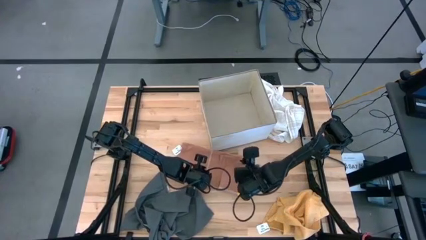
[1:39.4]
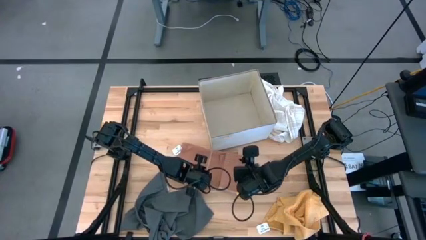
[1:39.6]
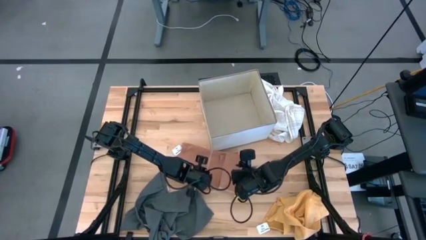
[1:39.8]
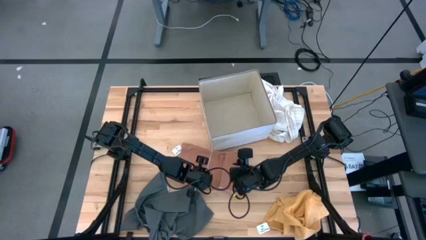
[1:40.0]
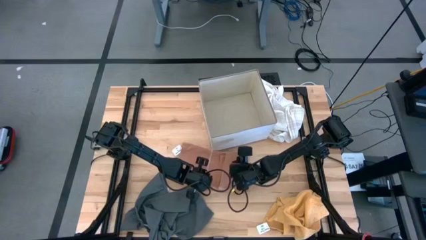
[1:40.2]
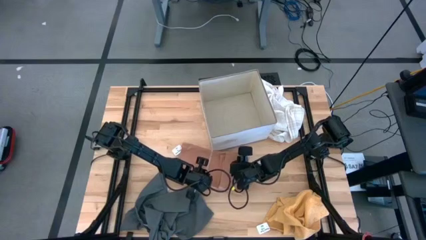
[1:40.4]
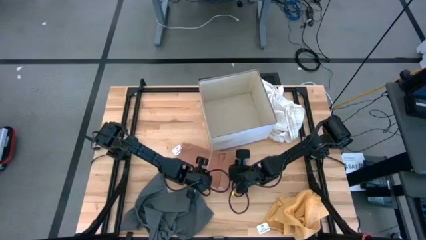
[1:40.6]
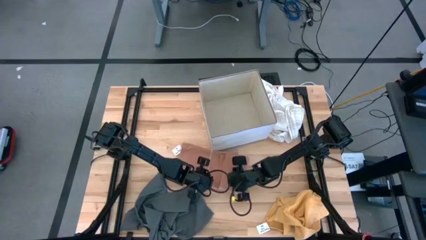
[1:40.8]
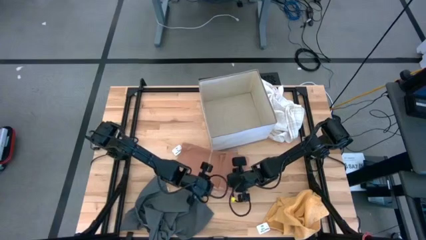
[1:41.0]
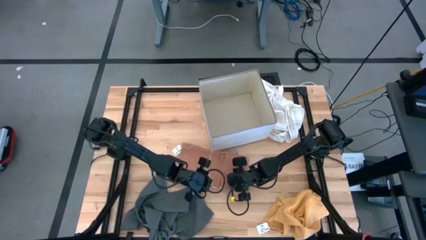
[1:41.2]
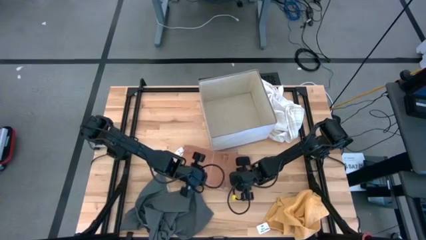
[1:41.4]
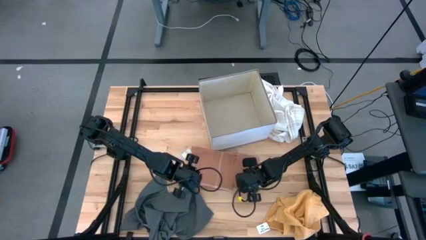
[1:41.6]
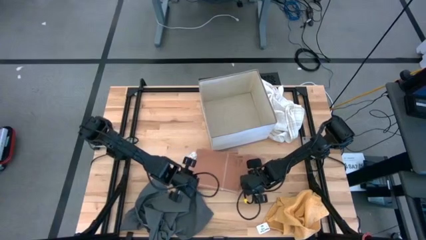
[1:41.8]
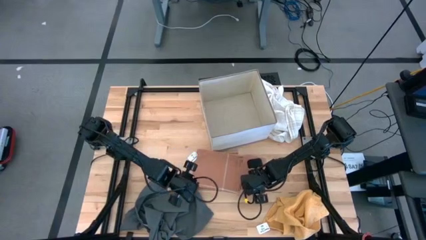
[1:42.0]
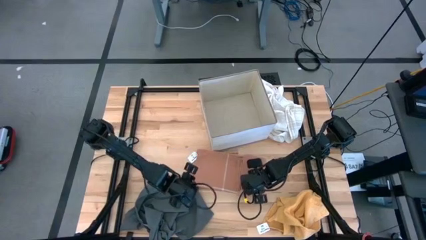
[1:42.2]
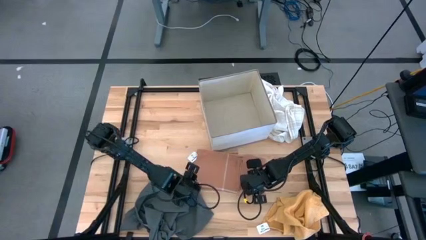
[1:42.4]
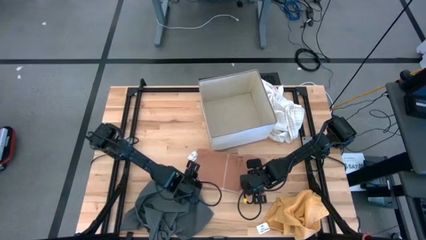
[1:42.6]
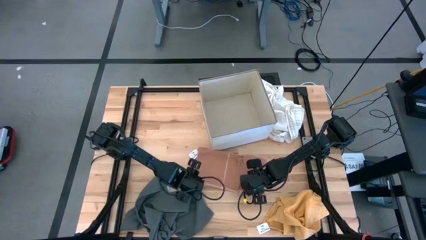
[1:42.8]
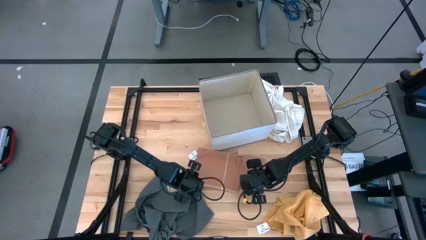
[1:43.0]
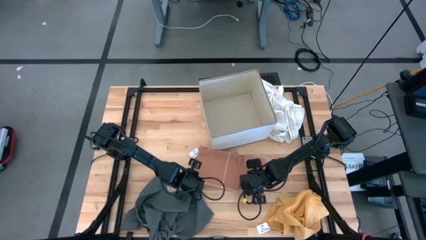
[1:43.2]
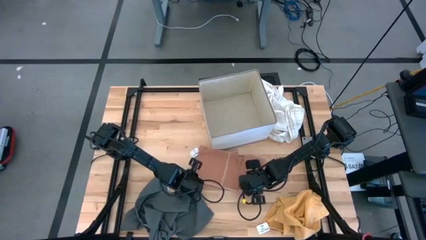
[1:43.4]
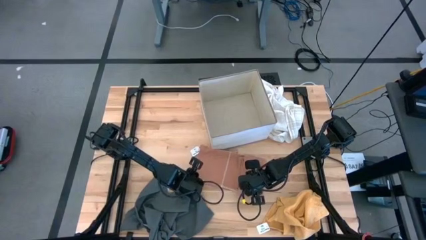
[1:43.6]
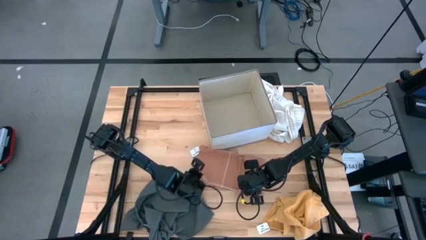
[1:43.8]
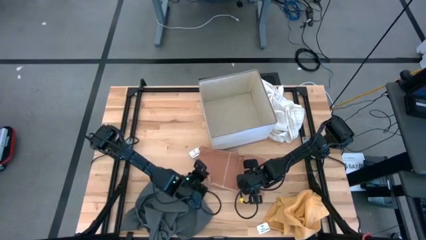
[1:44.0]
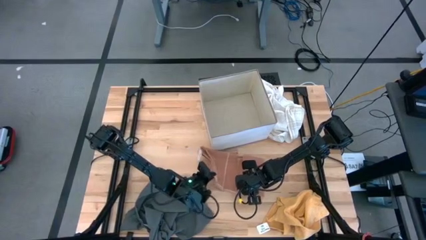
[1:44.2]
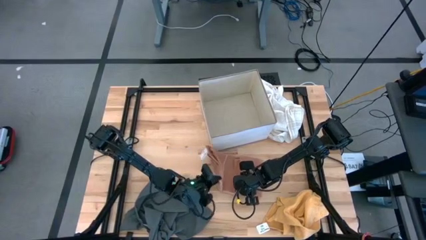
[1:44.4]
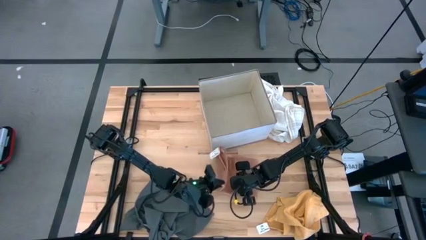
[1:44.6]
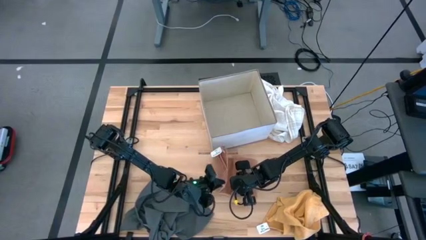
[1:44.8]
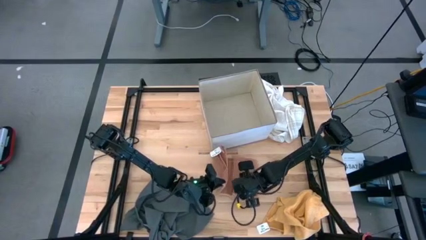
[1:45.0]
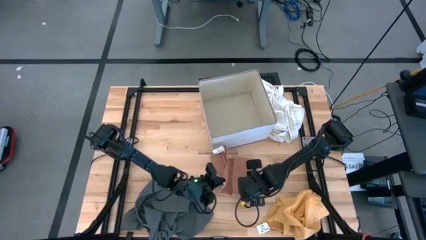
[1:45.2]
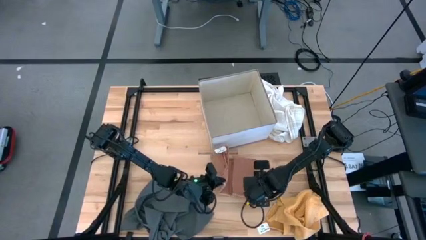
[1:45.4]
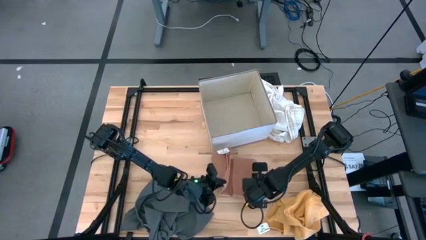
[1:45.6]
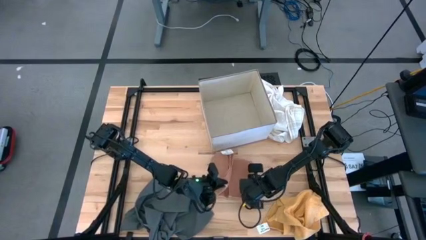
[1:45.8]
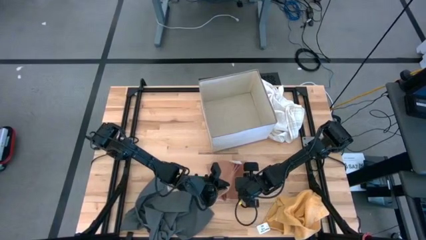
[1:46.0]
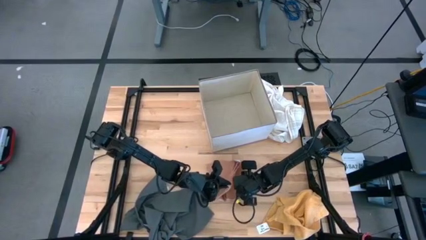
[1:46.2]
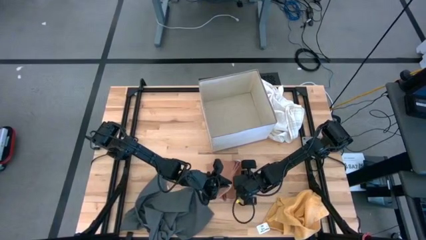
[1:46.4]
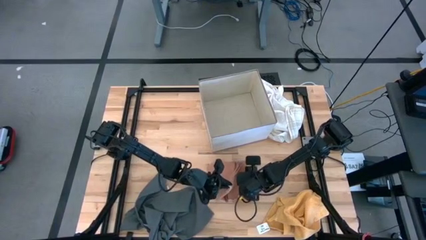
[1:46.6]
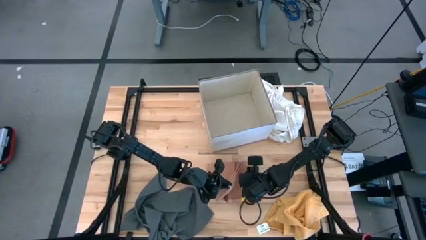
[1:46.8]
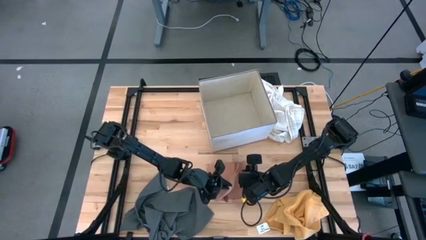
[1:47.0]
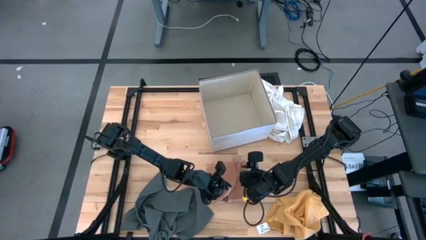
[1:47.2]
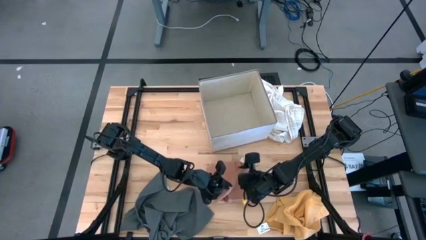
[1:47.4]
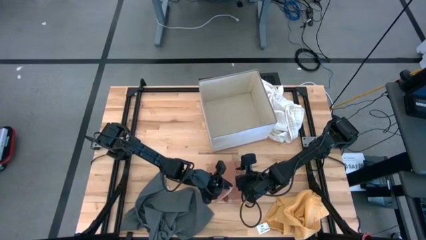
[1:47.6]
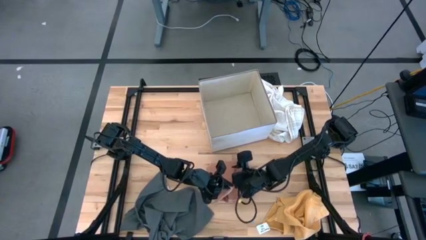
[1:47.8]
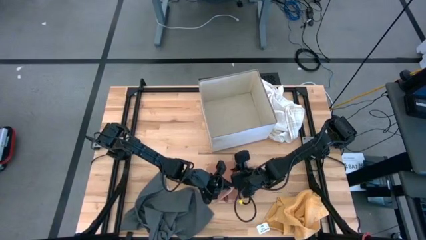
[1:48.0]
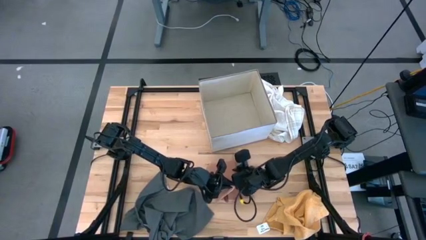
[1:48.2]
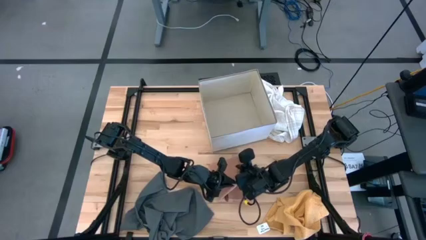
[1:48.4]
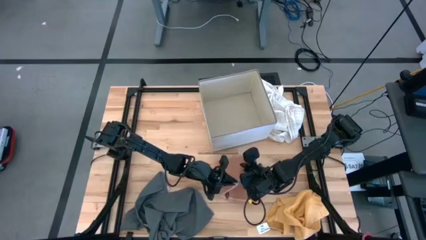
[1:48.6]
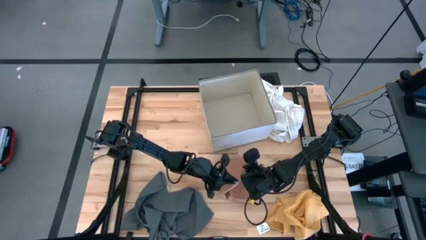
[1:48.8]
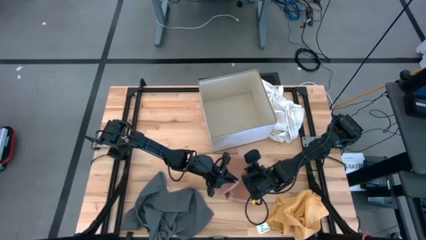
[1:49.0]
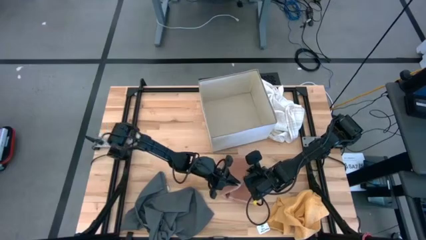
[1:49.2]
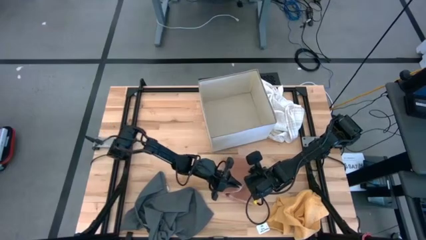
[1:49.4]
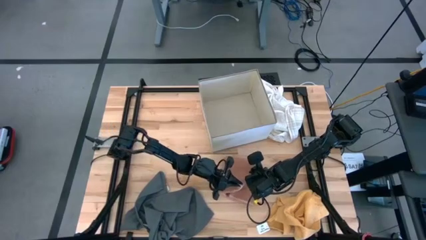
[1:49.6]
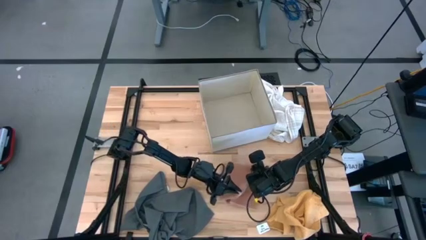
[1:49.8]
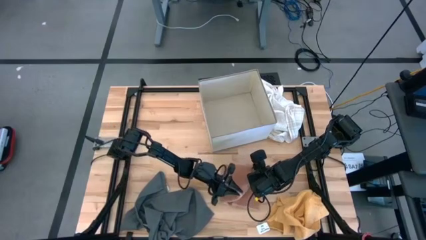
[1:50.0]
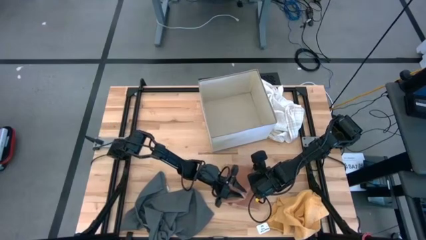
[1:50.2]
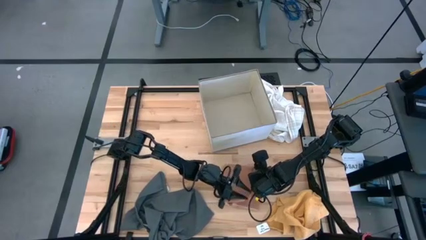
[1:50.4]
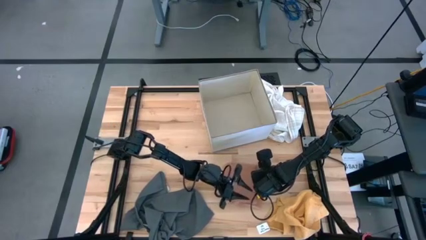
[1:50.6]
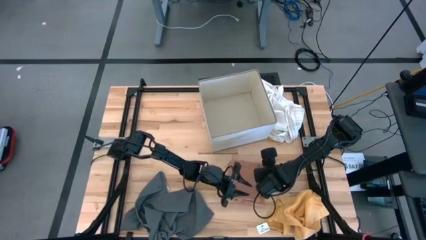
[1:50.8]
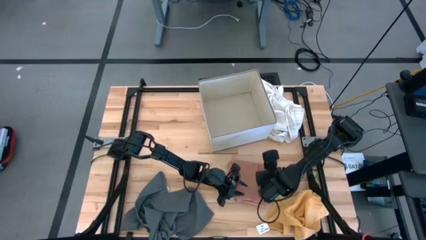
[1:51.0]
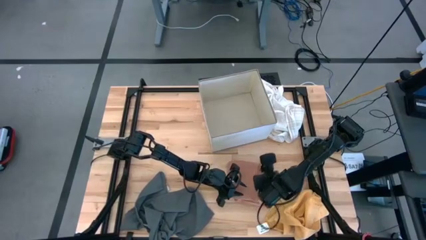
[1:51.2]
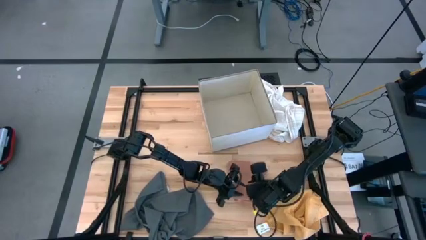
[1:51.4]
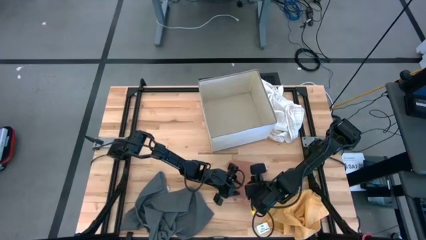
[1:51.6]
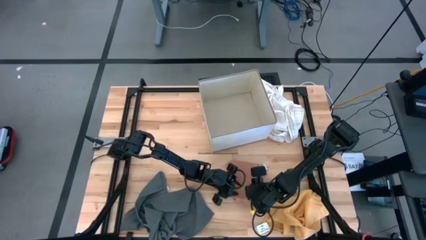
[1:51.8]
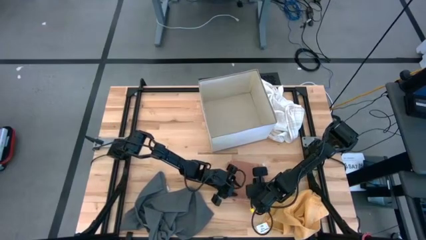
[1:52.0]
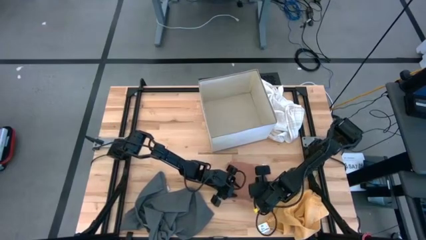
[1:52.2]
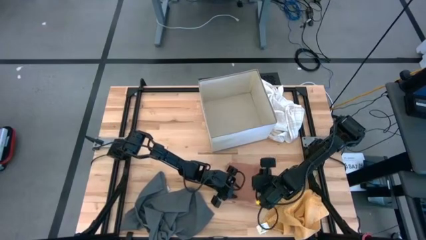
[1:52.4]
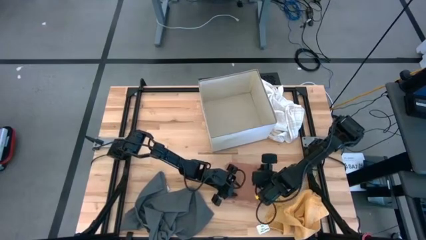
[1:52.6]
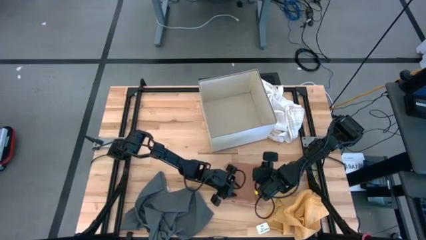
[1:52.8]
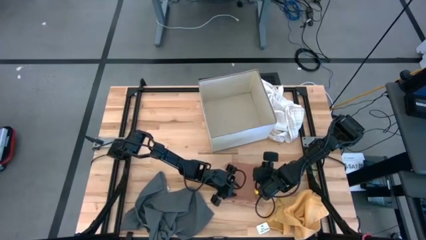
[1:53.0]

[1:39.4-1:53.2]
Task: Fold towel
Fold the brown towel
